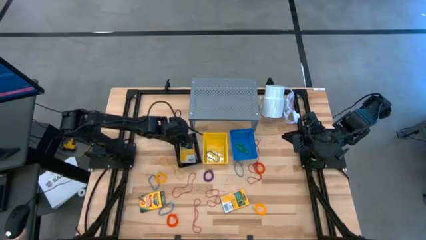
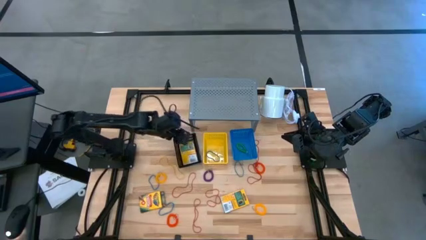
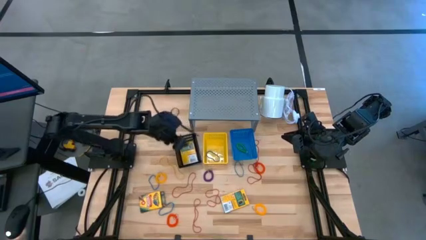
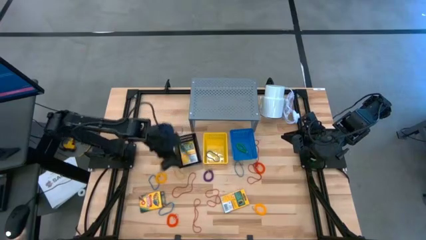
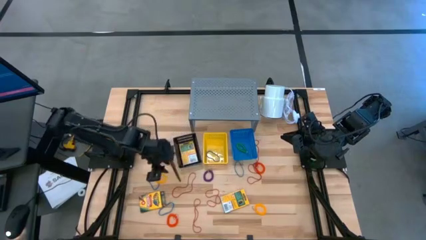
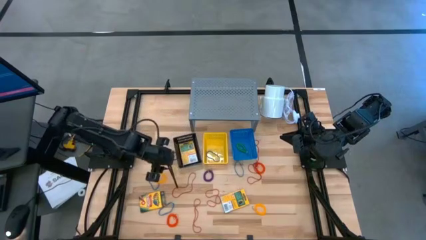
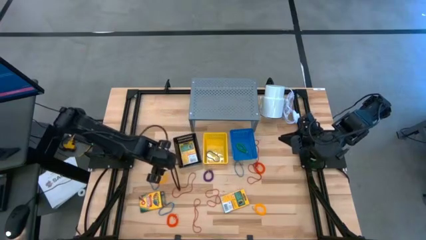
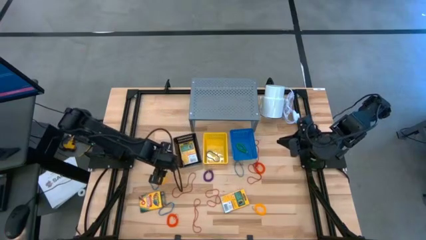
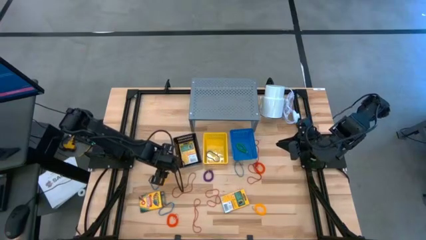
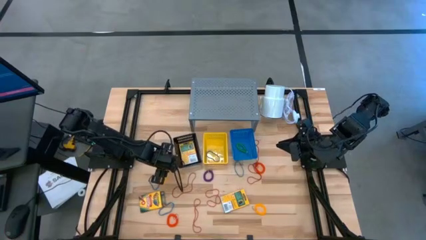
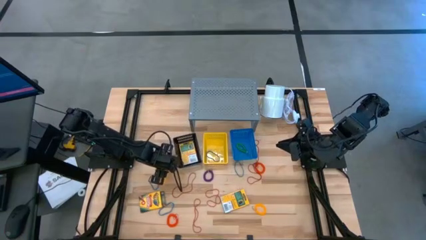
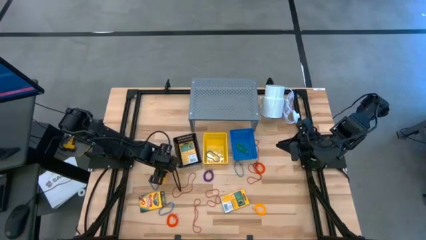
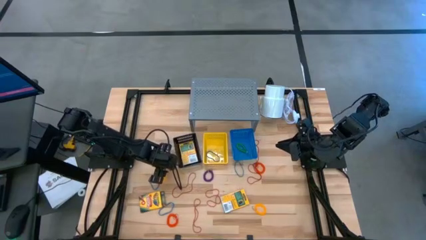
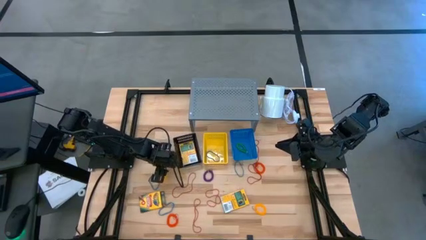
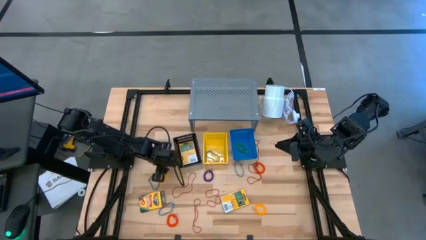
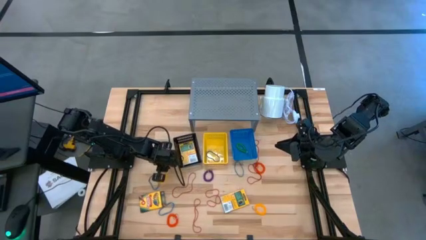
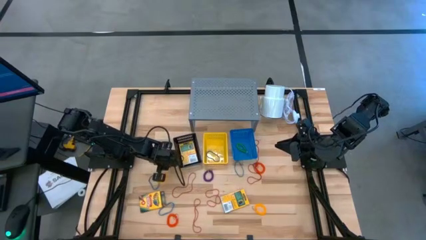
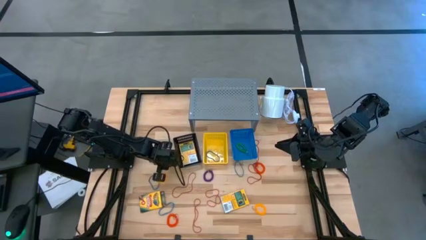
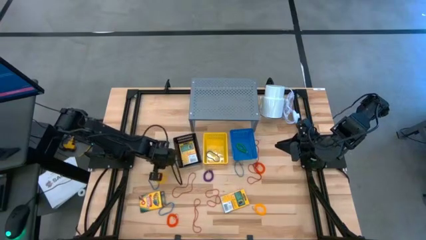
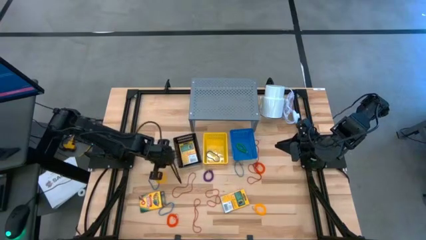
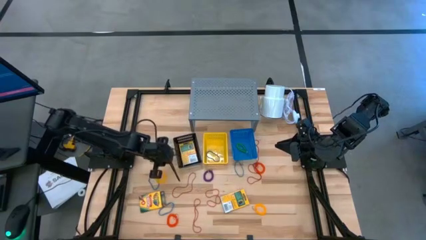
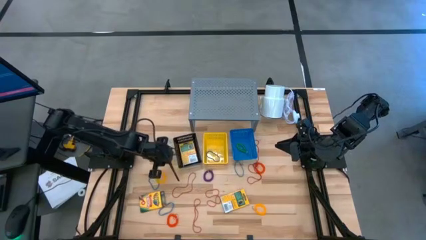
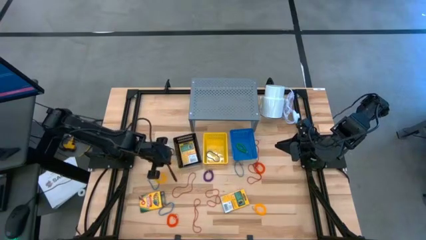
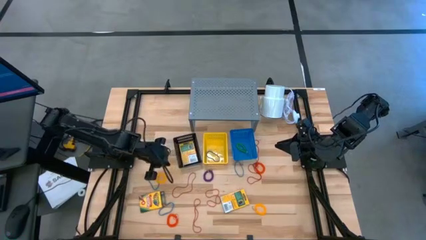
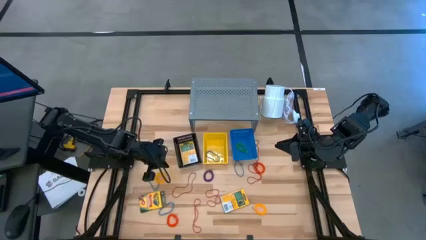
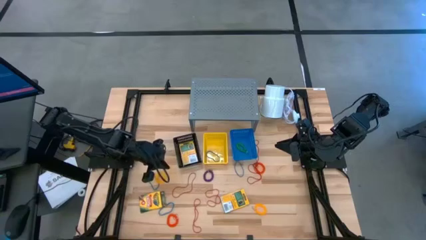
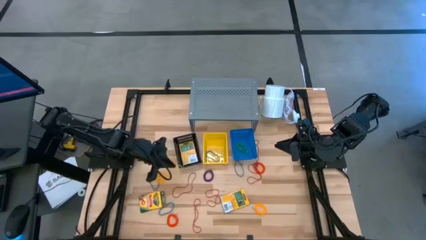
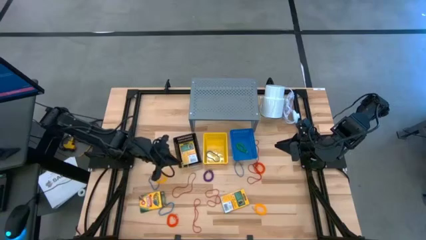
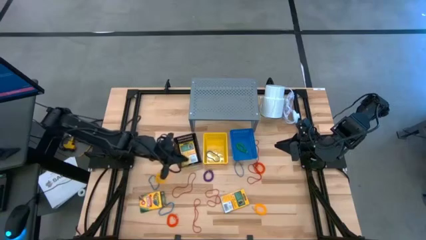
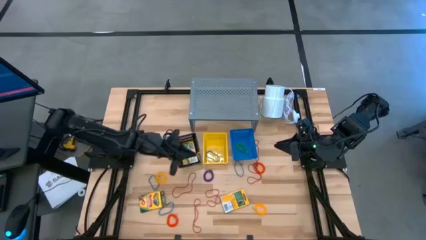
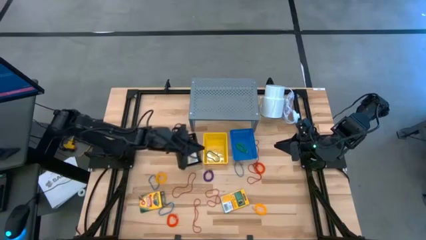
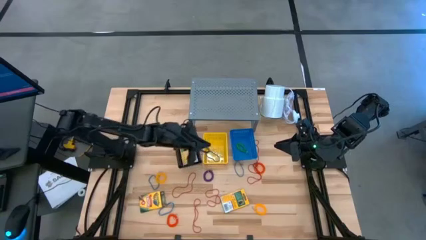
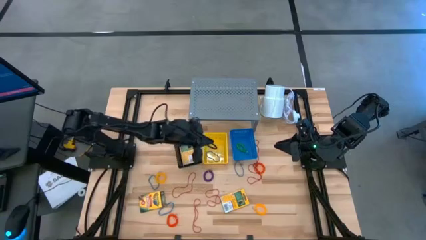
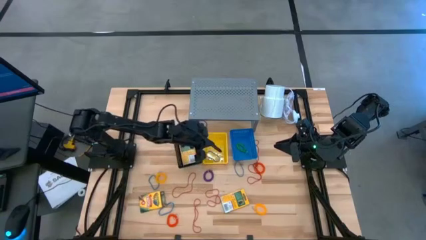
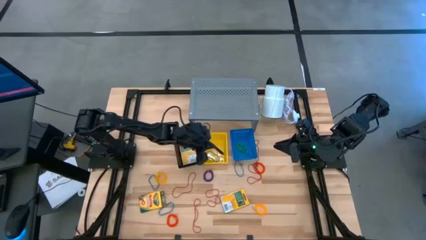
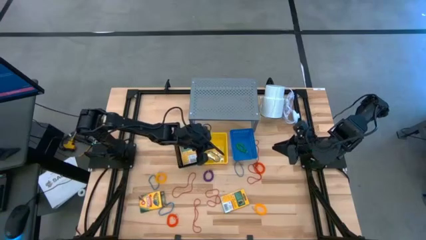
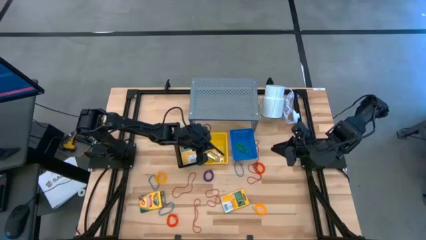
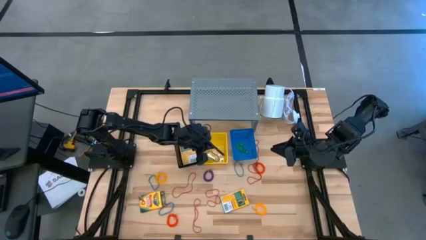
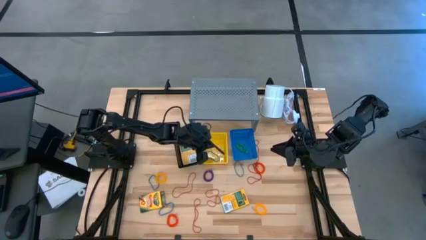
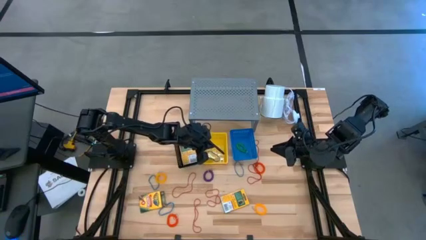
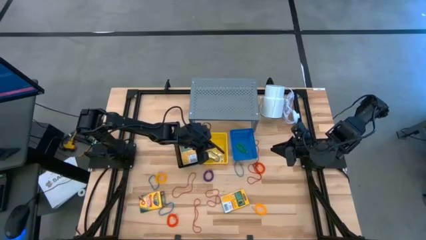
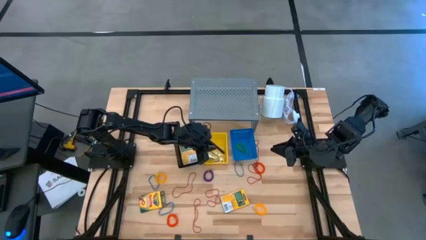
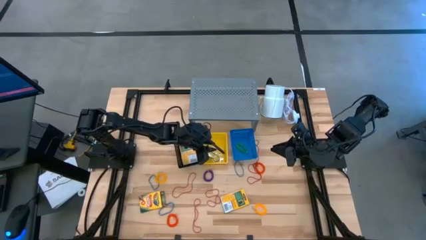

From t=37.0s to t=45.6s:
Task: Pick & Place Office Desk Supplies
Put the yellow rubber band into the yellow basket

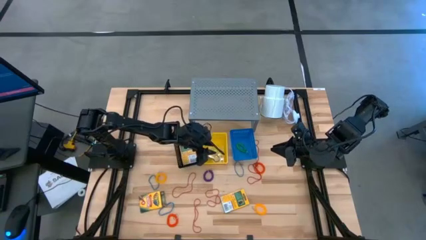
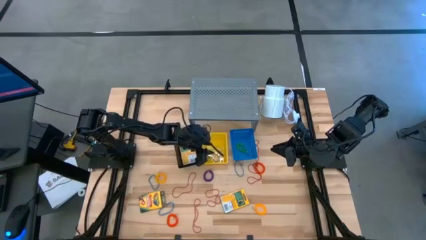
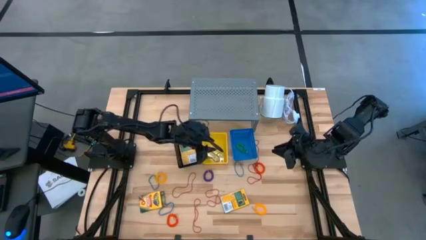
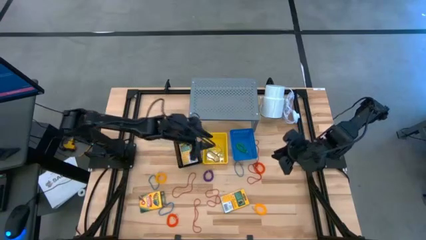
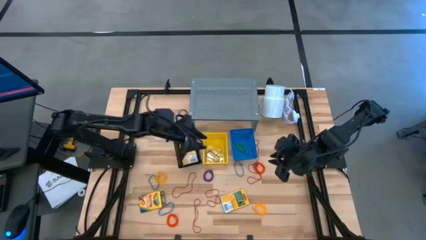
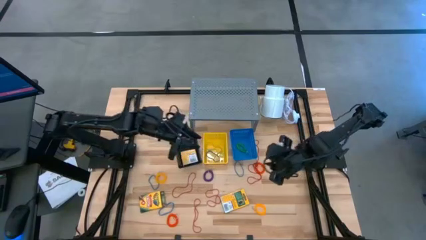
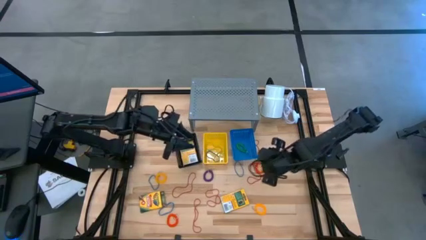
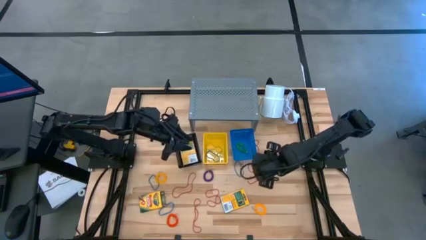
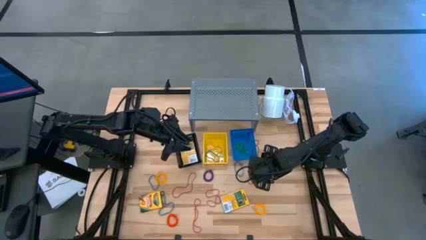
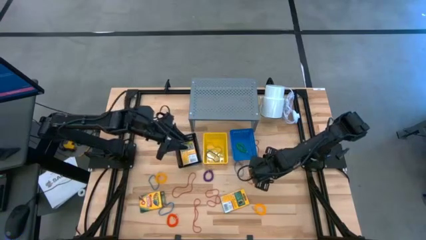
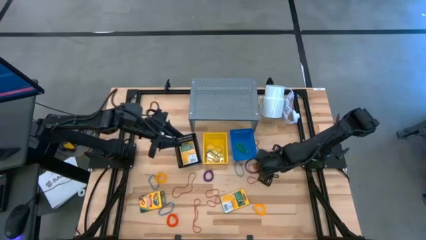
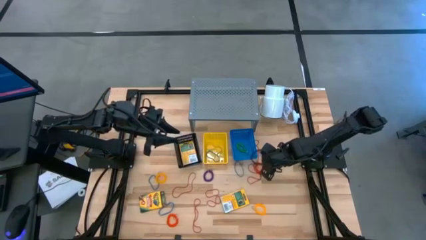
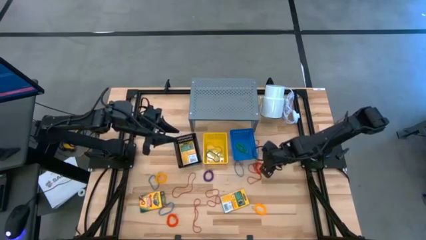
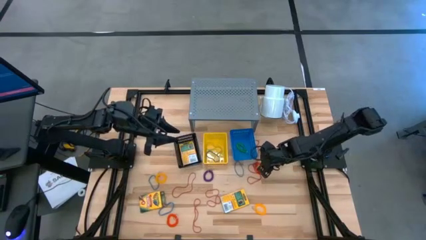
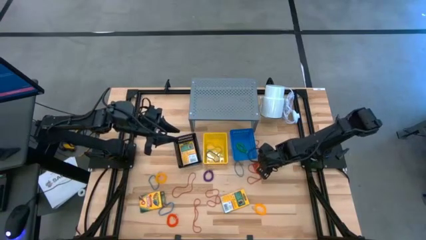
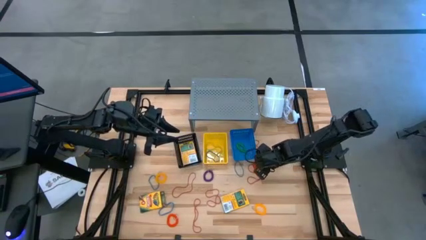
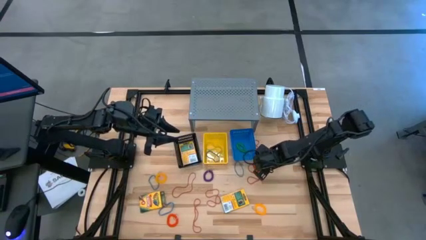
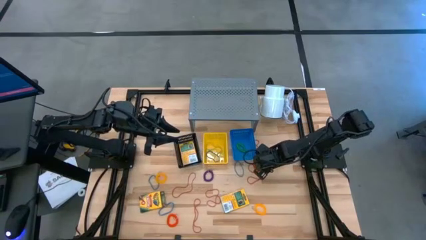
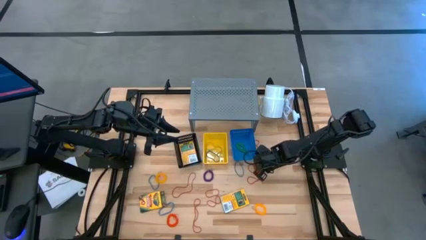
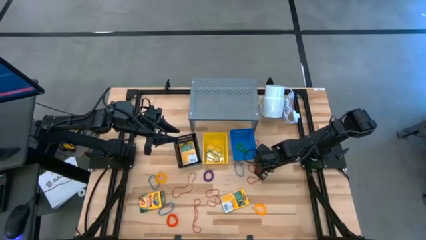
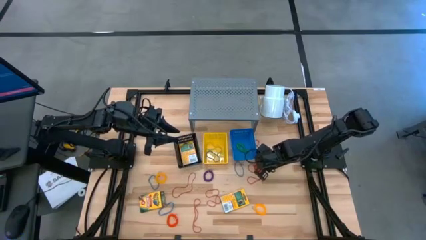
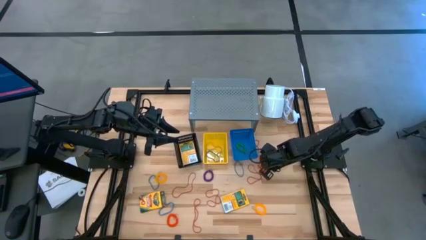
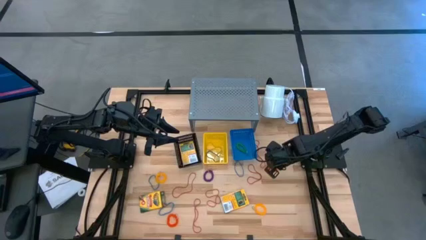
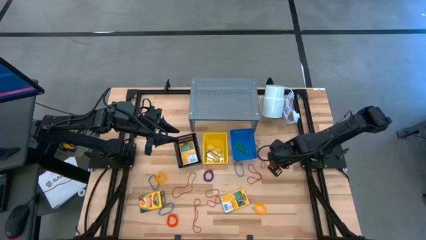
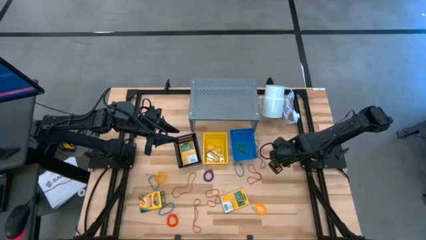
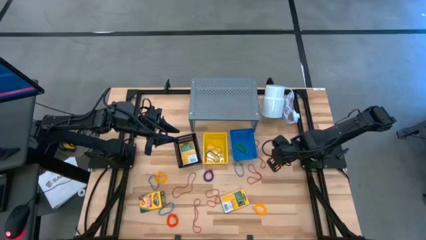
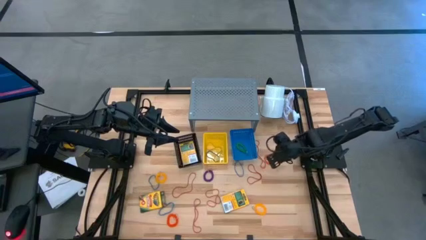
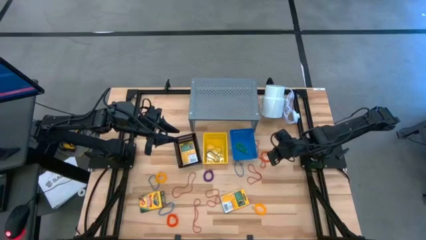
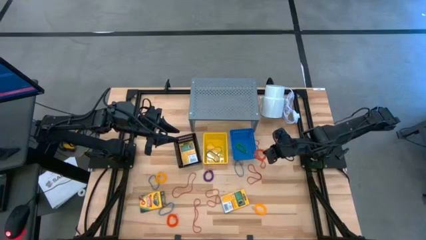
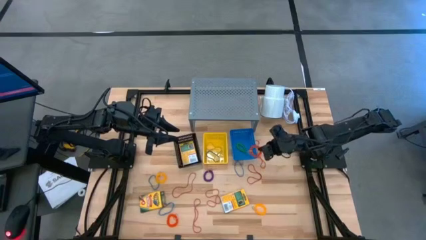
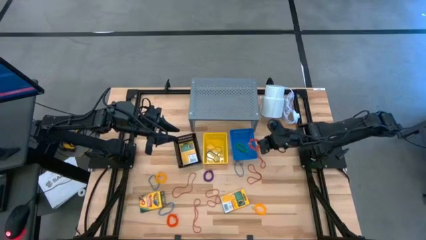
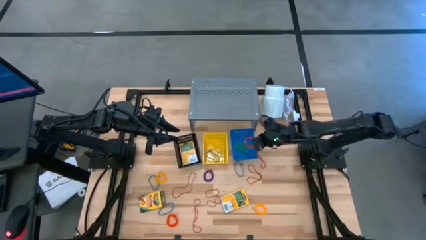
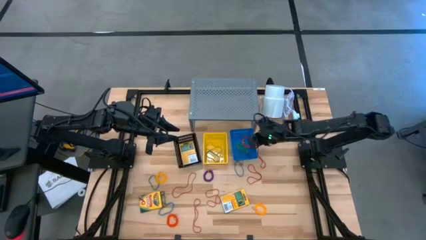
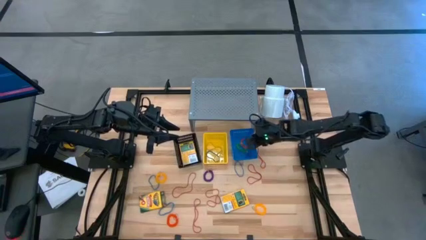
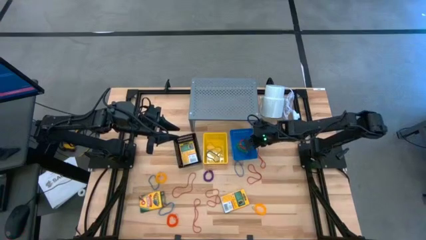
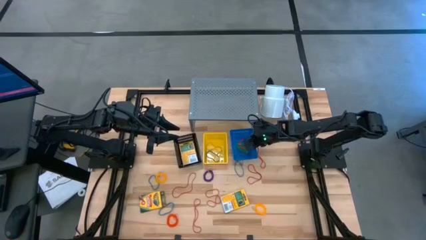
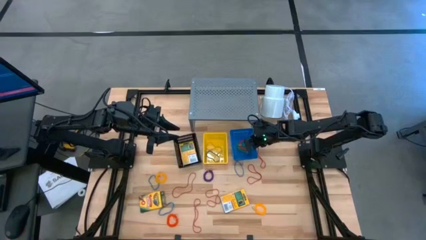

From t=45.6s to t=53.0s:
Put the orange spring keychain into the blue basket

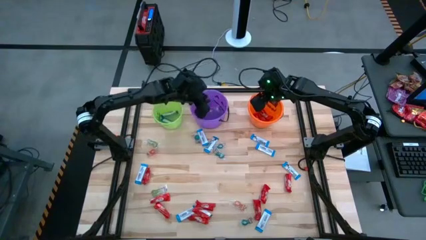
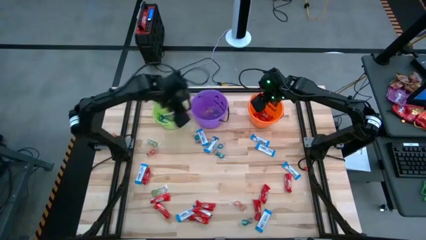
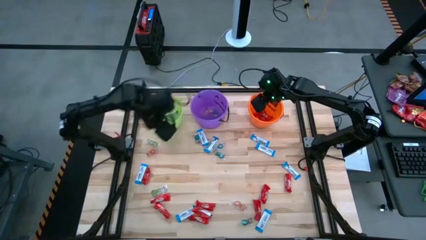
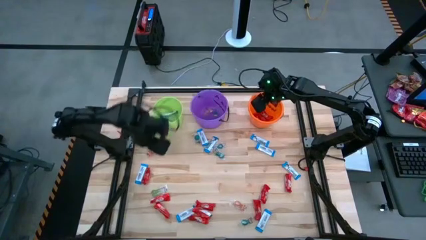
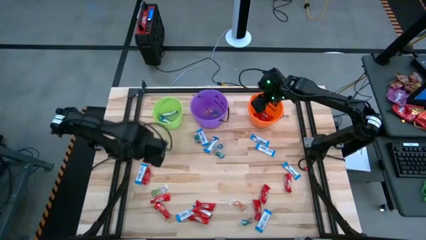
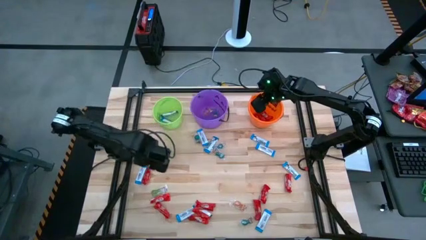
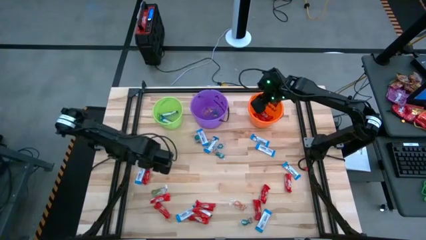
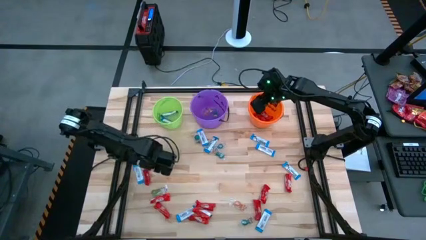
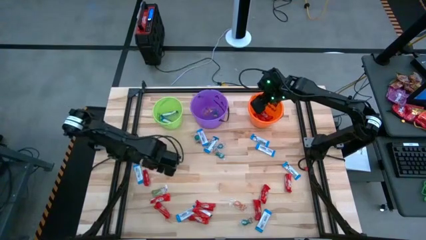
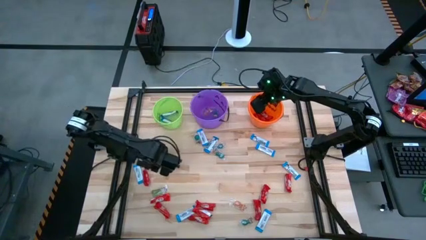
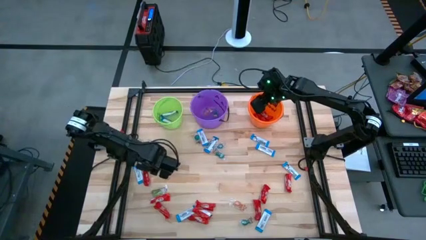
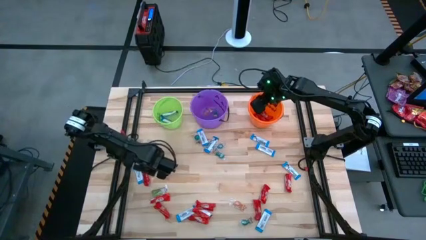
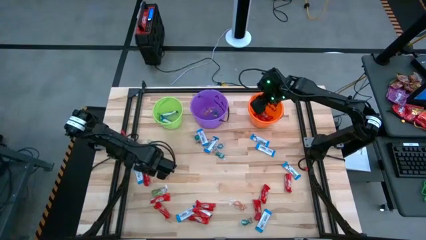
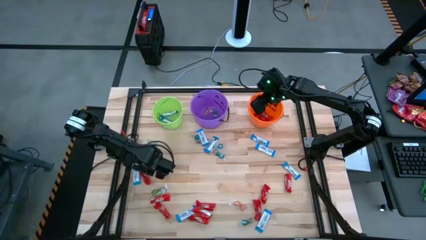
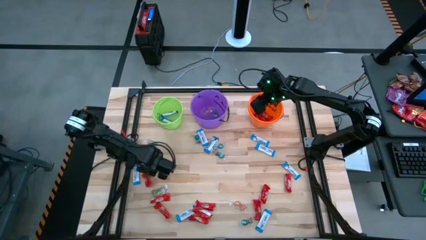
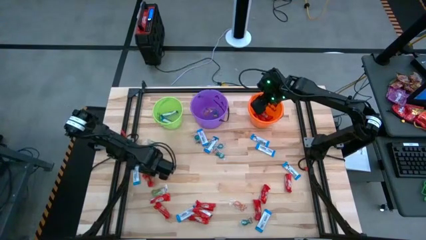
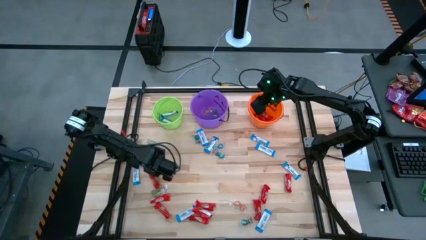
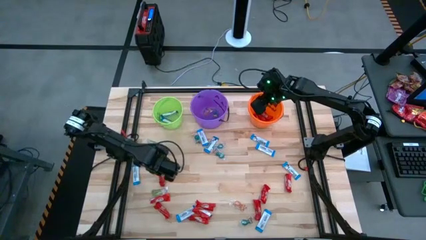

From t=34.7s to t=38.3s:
Task: Sort candy by brand, put in halloween buckets
Put the red chocolate into the orange bucket
